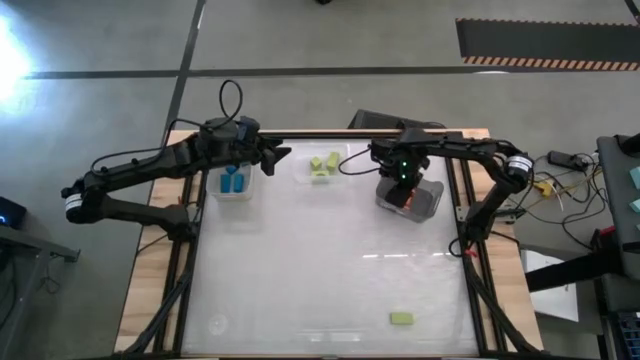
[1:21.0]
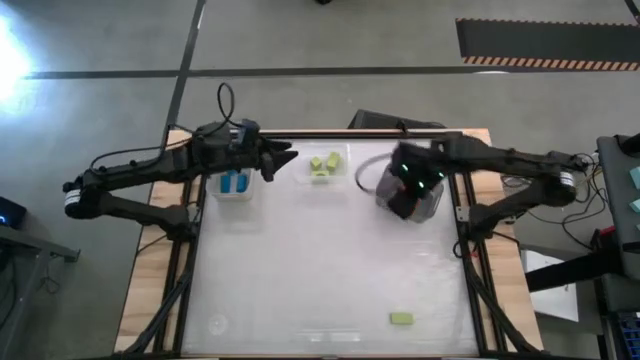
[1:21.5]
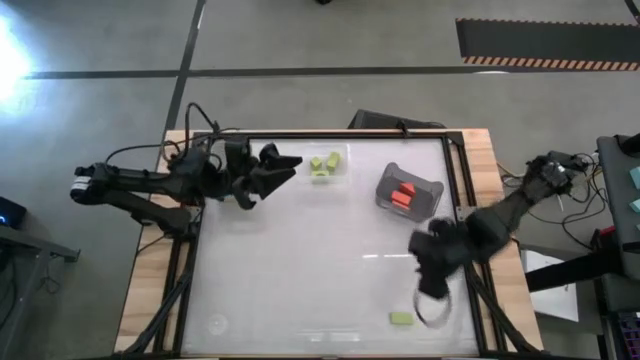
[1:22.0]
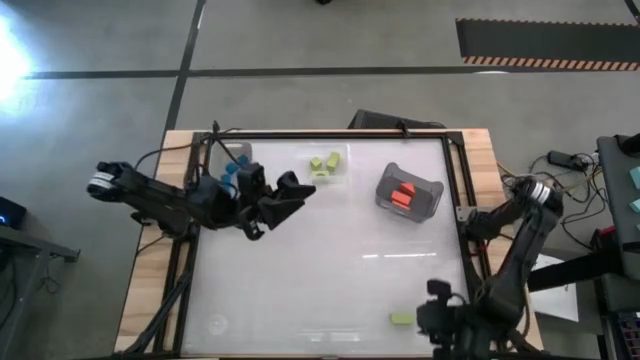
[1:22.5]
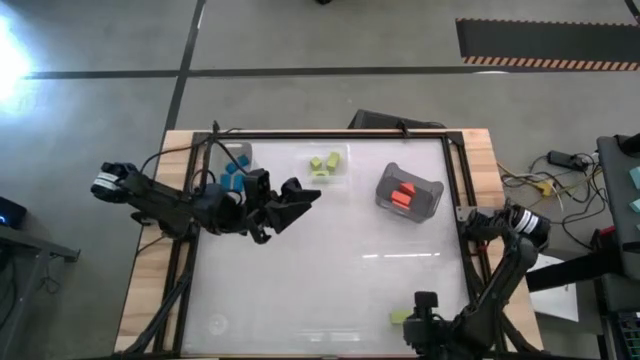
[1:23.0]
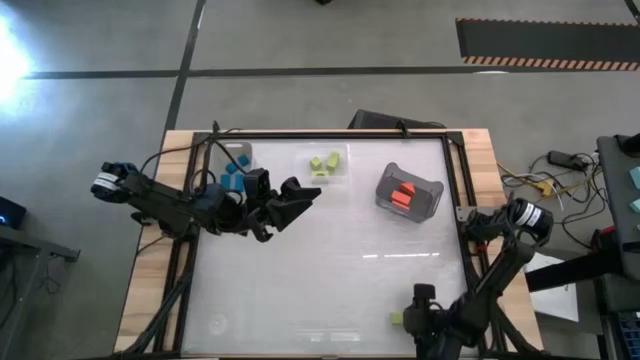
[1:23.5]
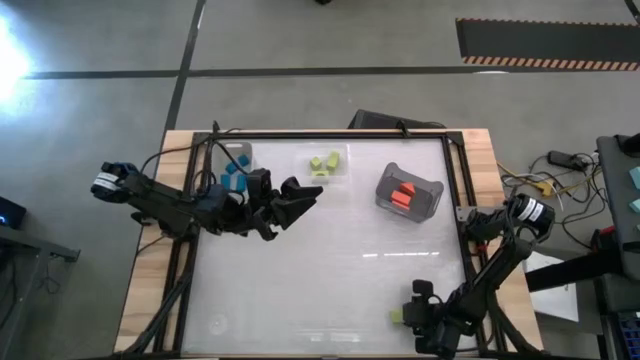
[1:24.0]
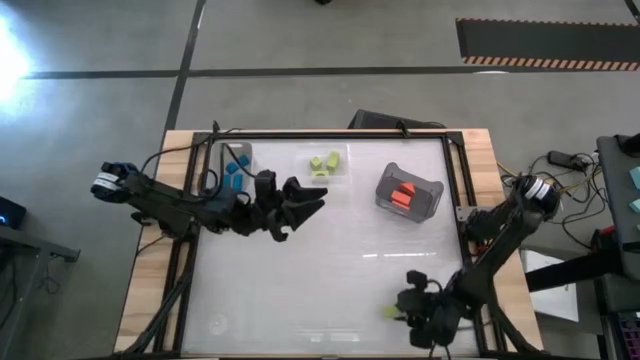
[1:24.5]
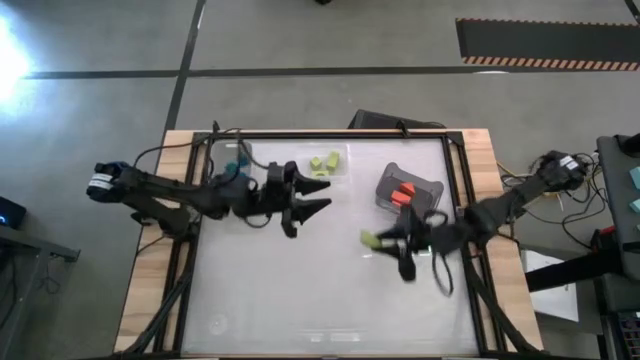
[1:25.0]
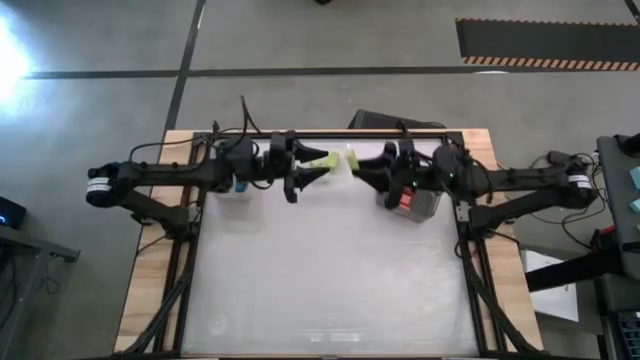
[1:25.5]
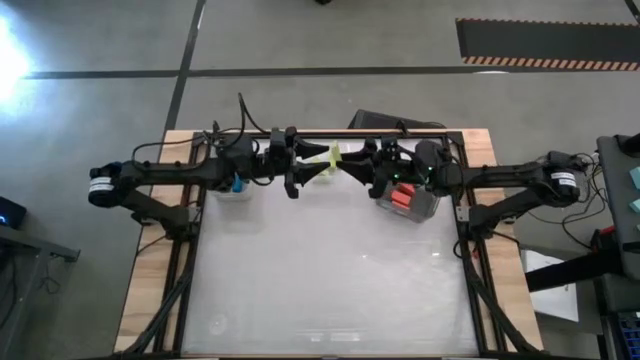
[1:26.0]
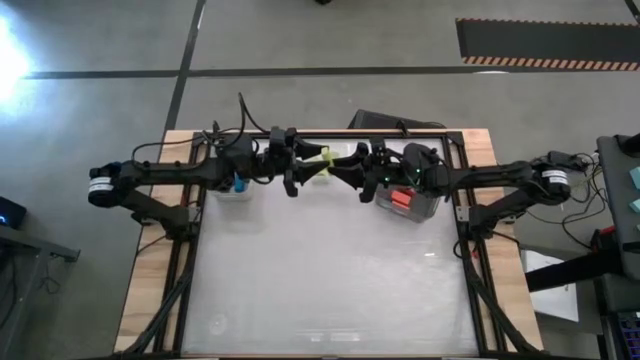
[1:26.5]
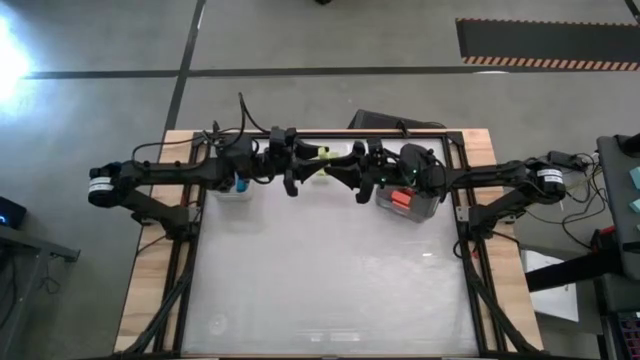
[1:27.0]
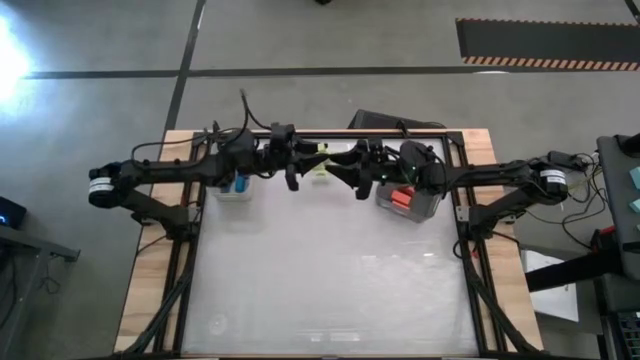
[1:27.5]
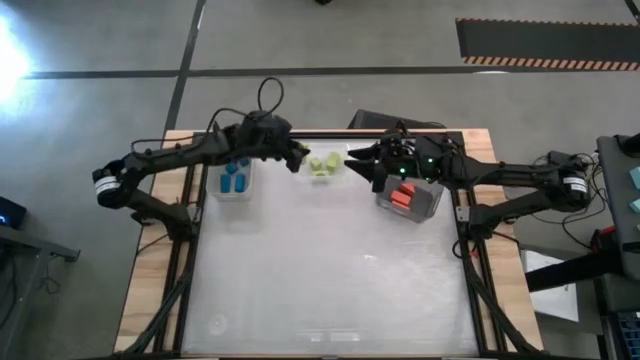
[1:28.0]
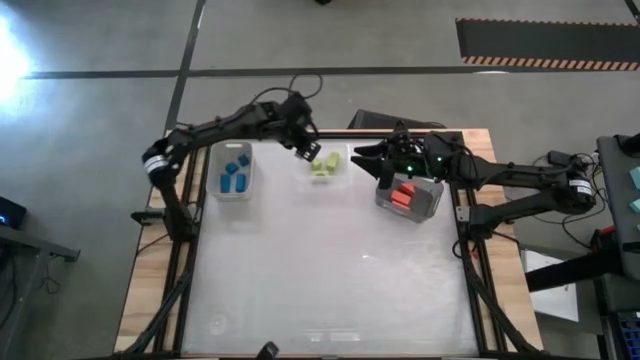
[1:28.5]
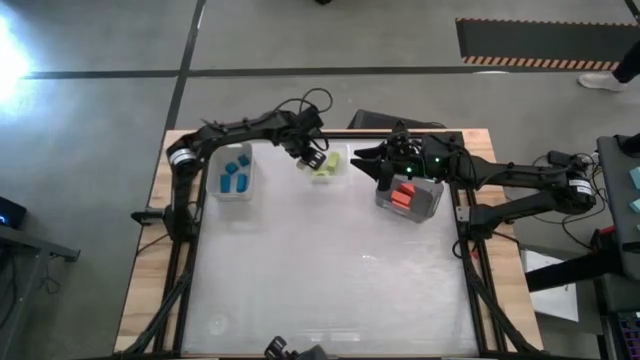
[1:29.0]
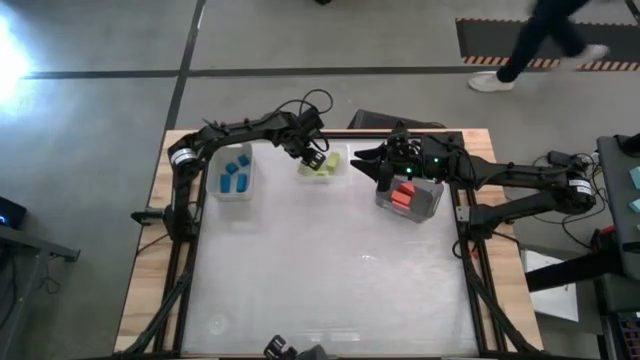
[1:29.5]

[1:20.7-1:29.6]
Task: Sort & place blocks by color
Put the green block into the transparent bin

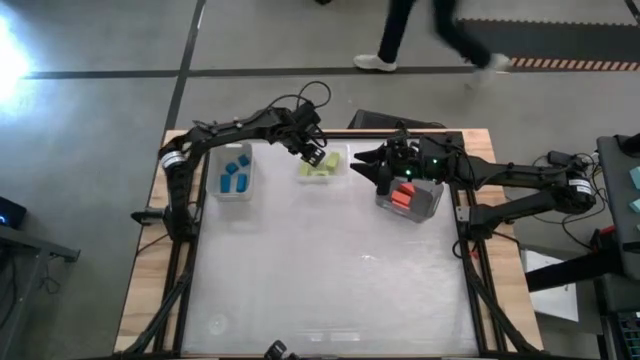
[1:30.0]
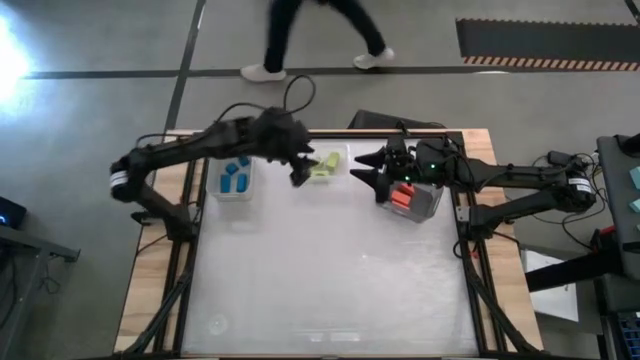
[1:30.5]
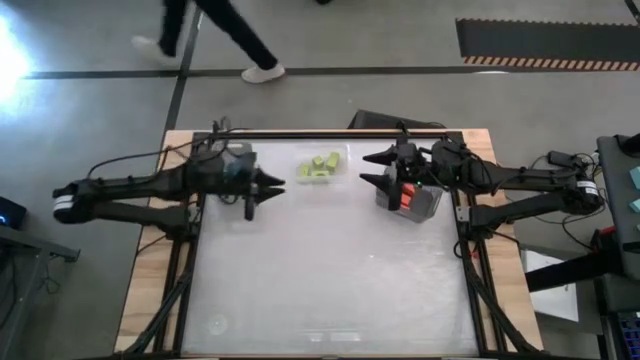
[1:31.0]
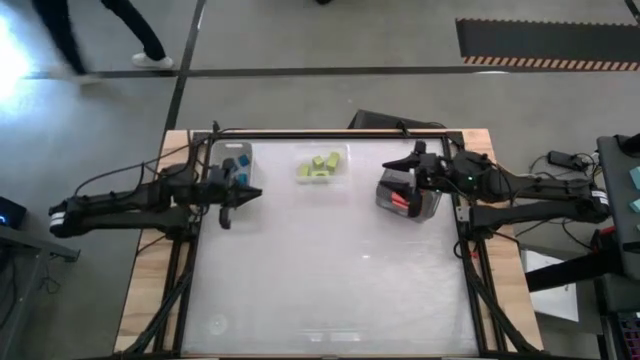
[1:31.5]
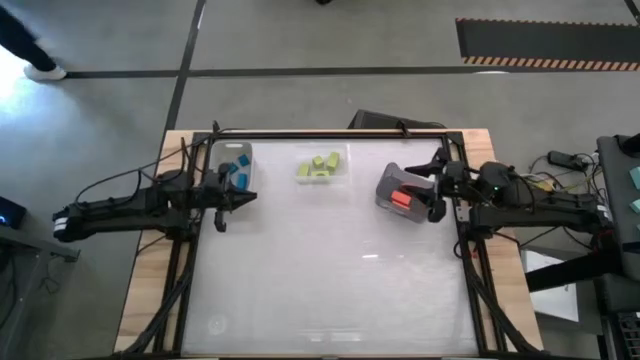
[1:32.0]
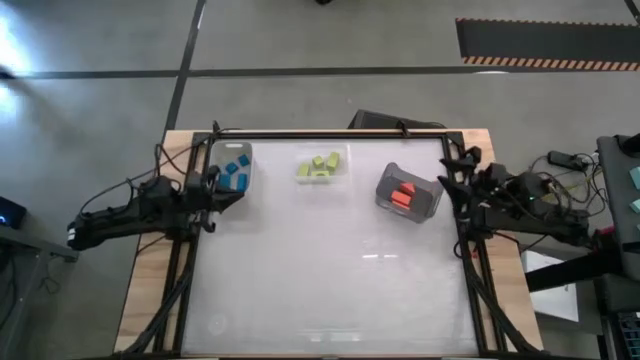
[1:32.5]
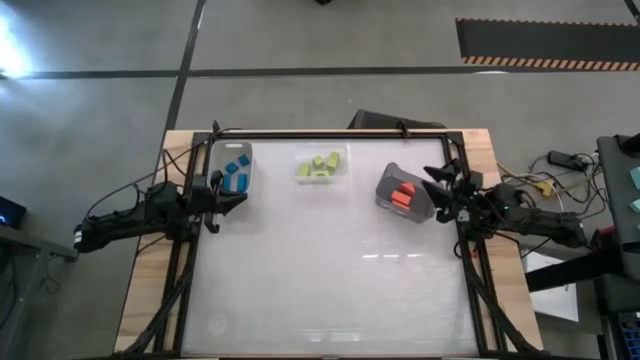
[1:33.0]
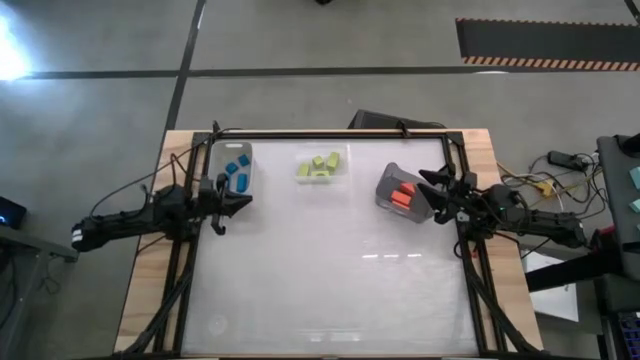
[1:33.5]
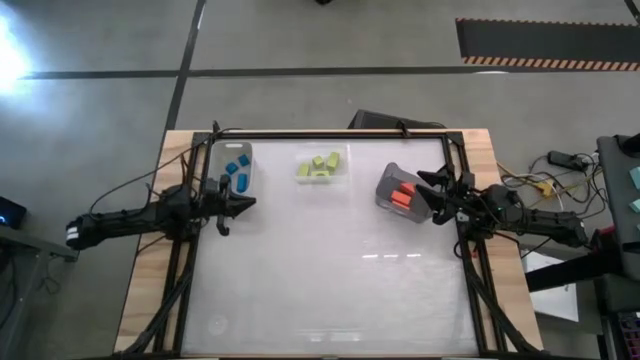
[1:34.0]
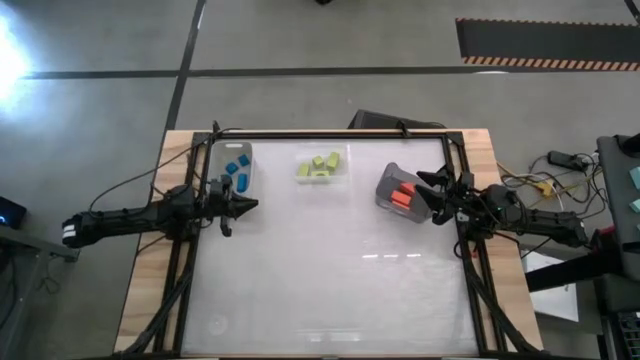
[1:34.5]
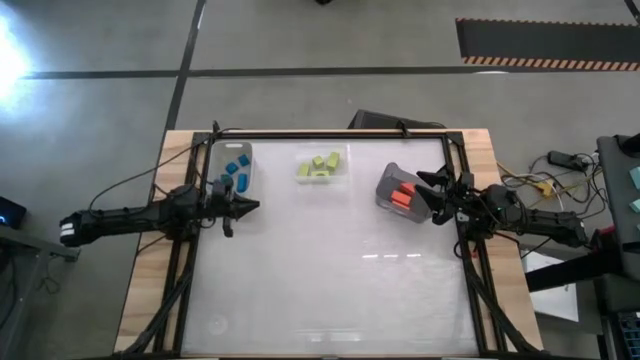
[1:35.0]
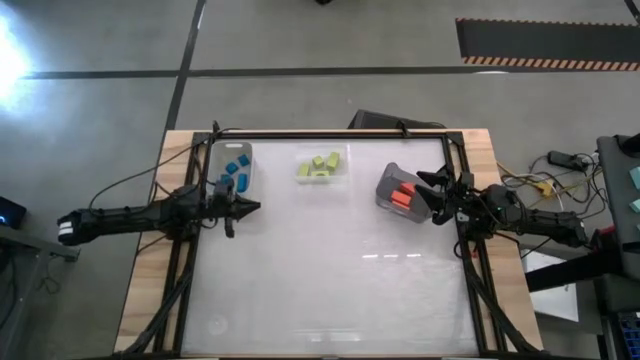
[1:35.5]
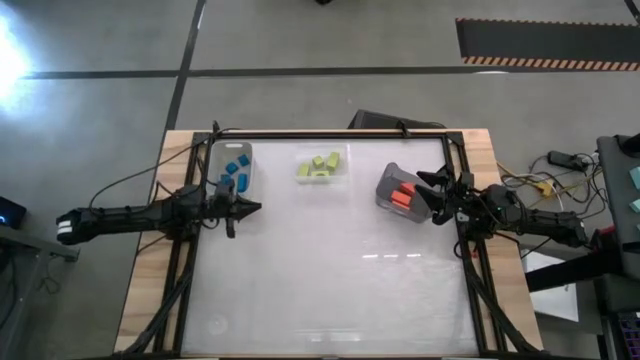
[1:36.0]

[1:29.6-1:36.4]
Return to Home Position

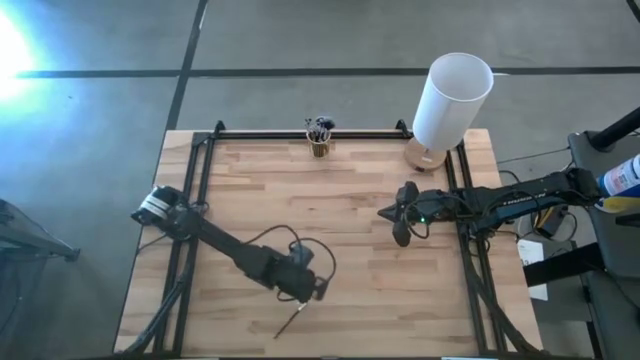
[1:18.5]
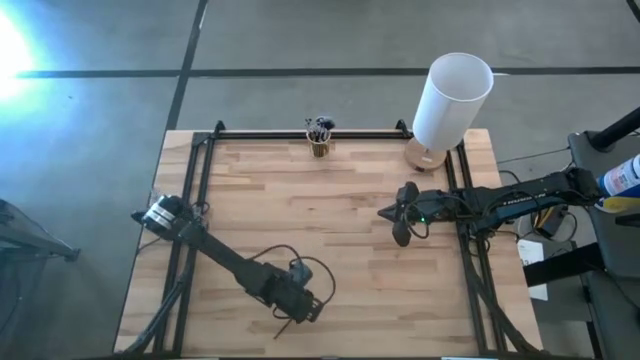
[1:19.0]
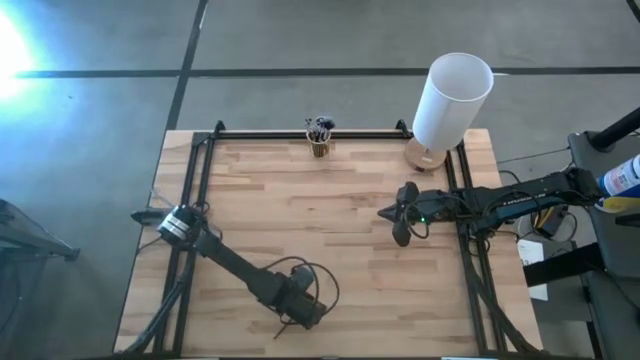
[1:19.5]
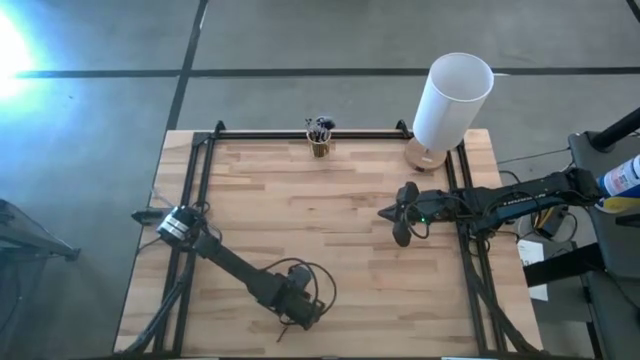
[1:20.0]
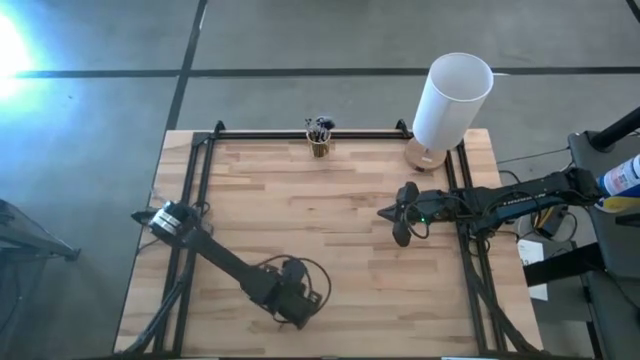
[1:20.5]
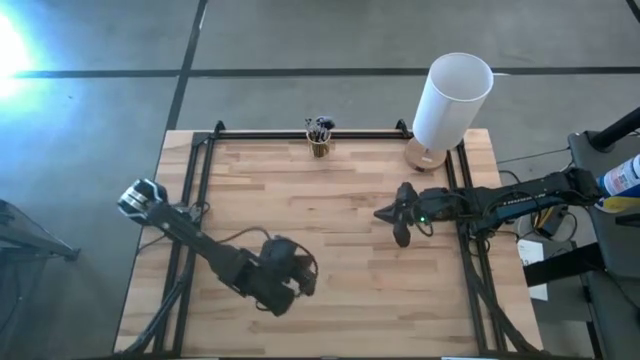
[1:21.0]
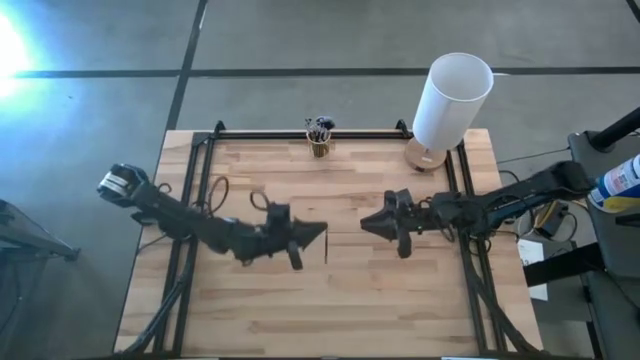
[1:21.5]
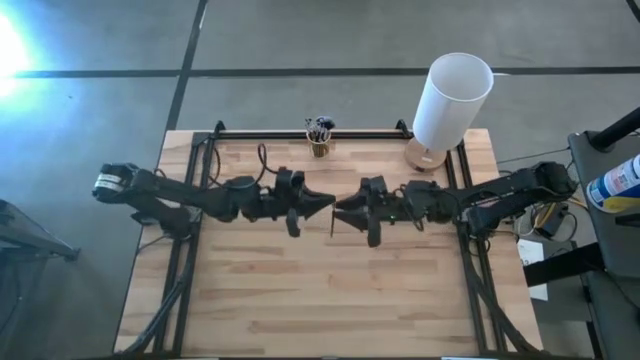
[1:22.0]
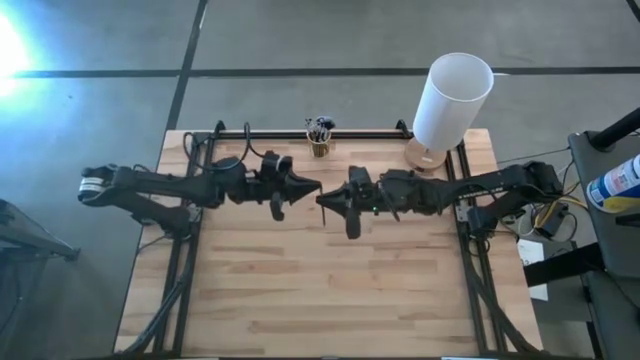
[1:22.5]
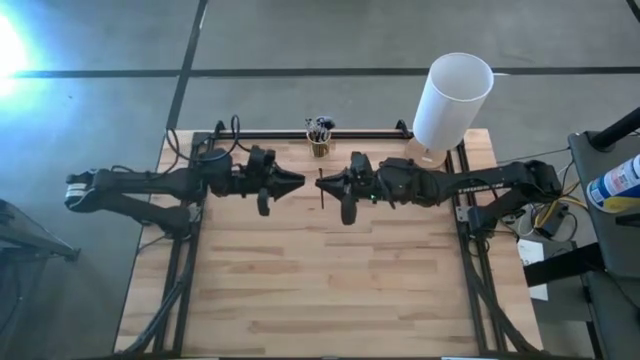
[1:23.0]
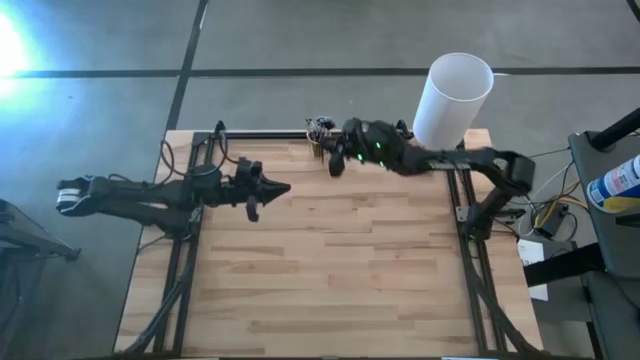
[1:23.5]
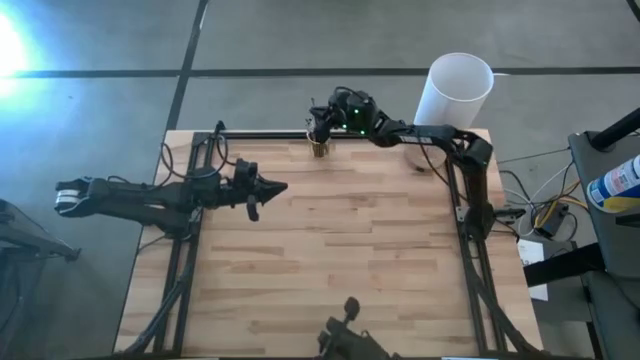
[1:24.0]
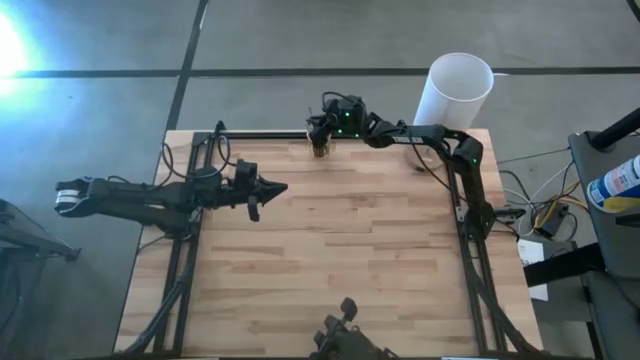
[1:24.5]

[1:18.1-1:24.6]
Task: Put items in baskets/containers
Put the black eyeshadow brush into the yellow pen holder
